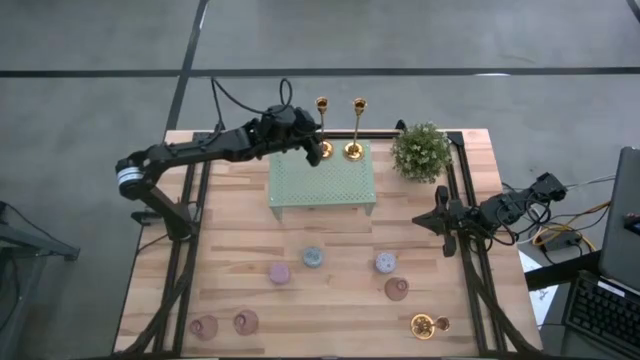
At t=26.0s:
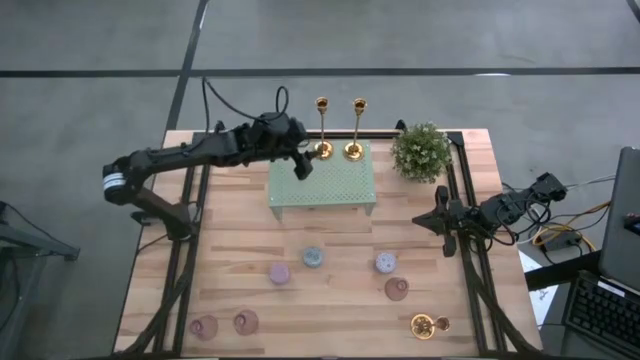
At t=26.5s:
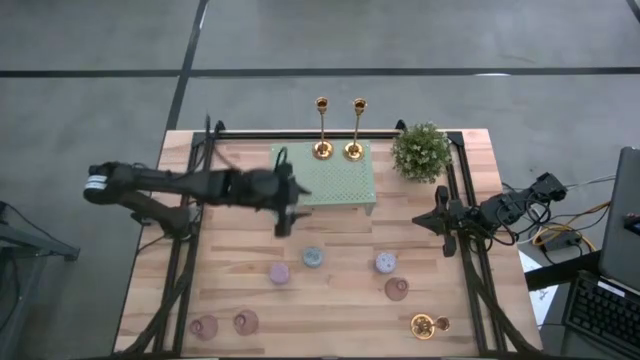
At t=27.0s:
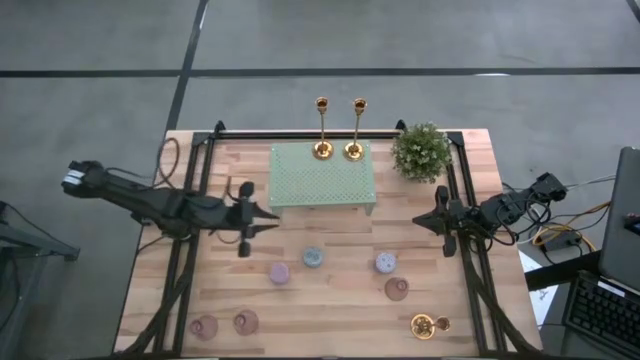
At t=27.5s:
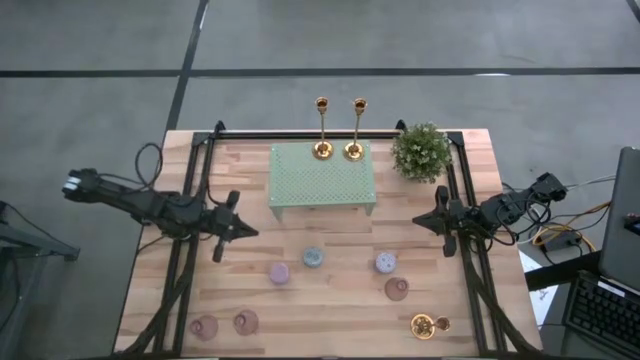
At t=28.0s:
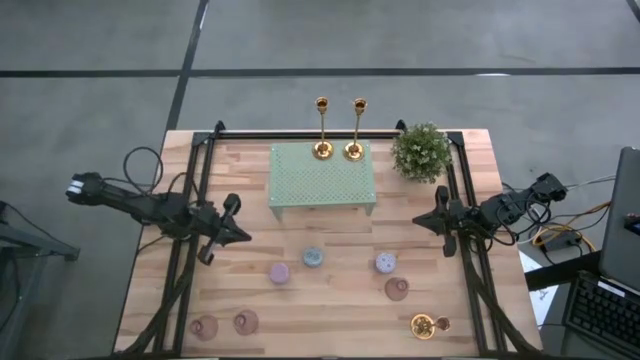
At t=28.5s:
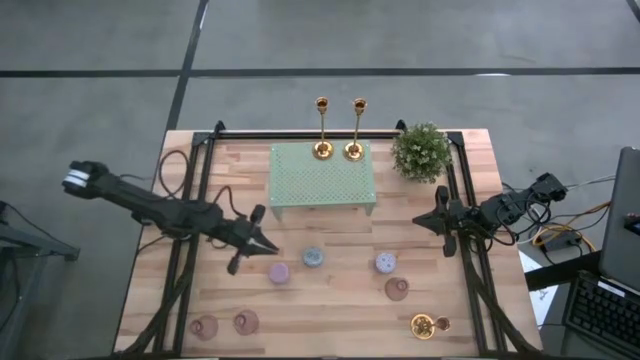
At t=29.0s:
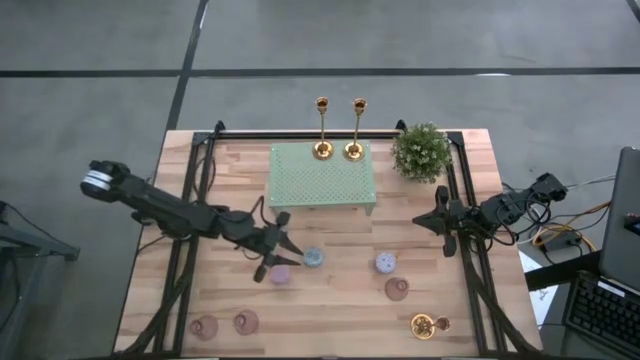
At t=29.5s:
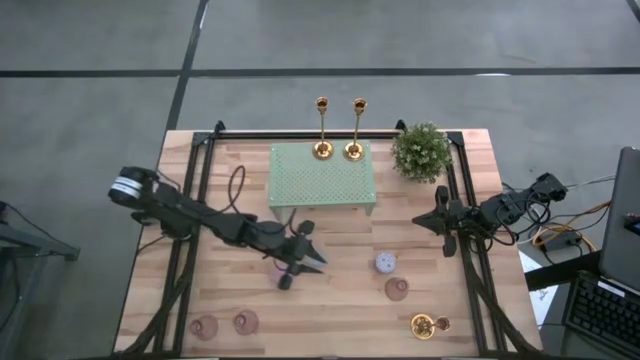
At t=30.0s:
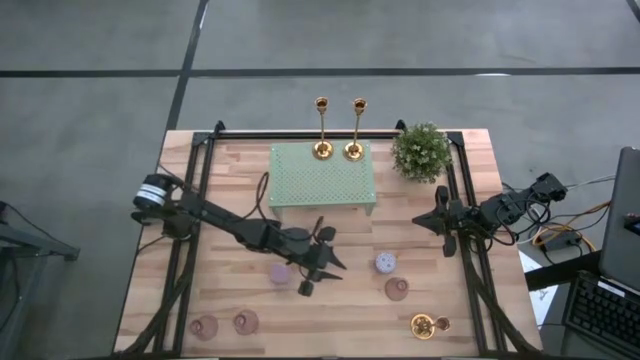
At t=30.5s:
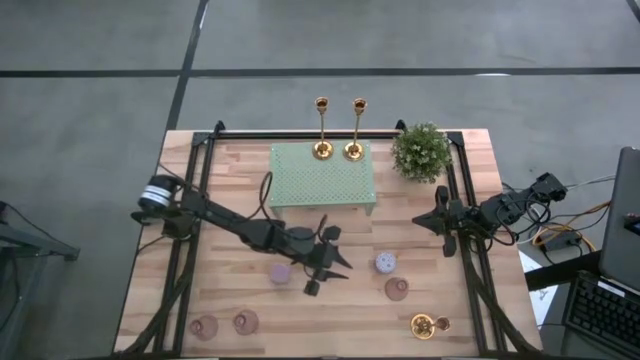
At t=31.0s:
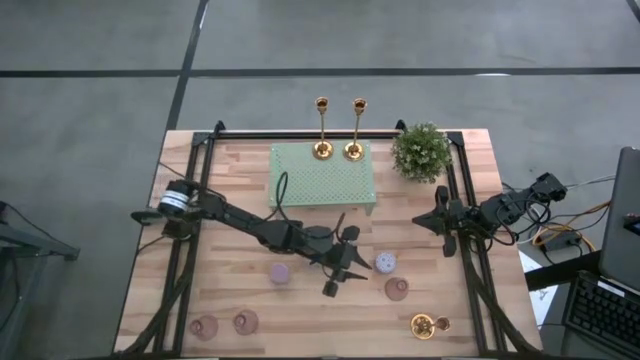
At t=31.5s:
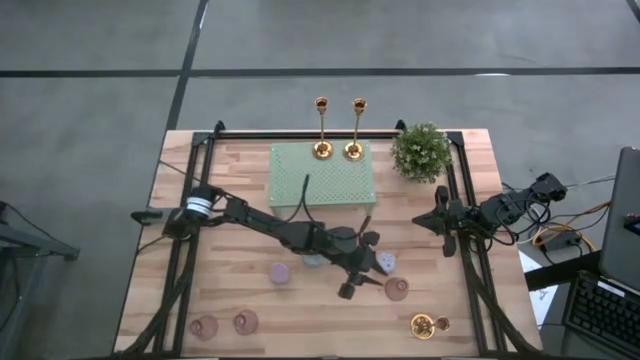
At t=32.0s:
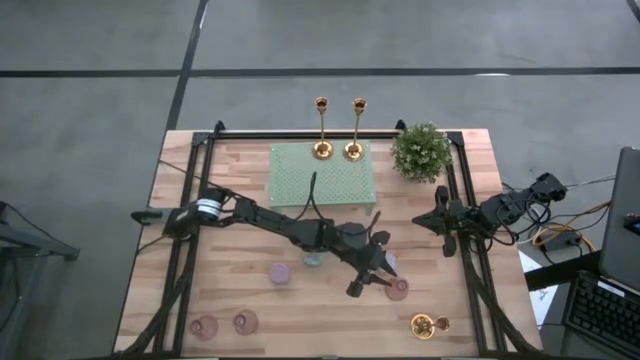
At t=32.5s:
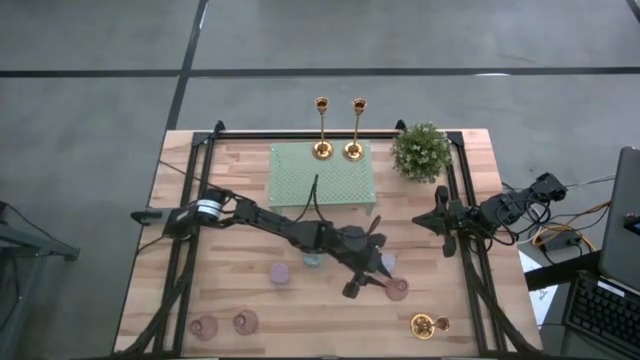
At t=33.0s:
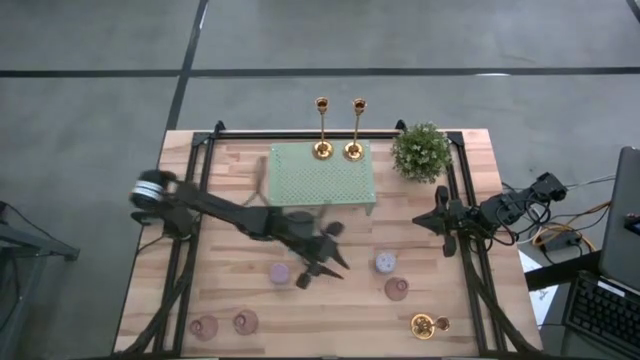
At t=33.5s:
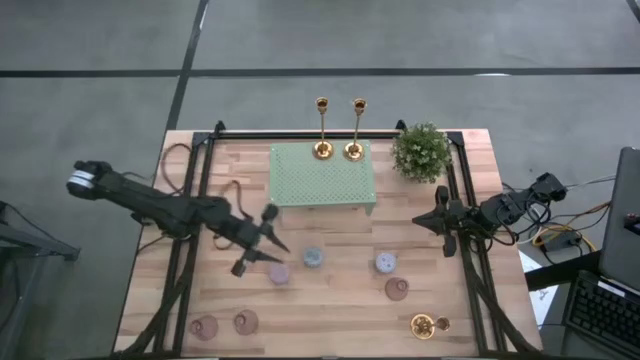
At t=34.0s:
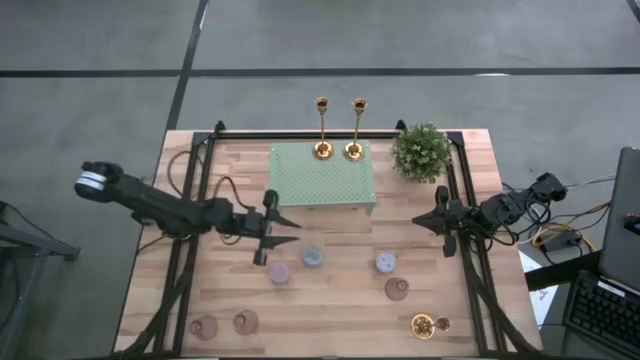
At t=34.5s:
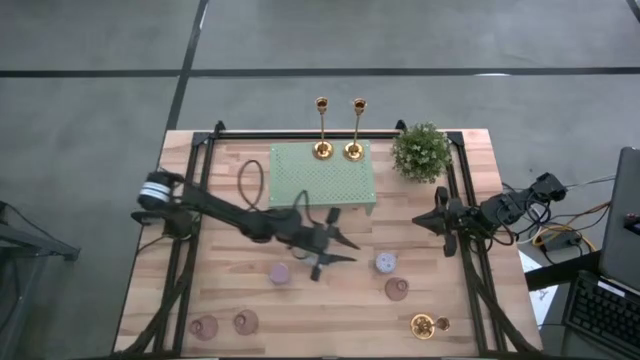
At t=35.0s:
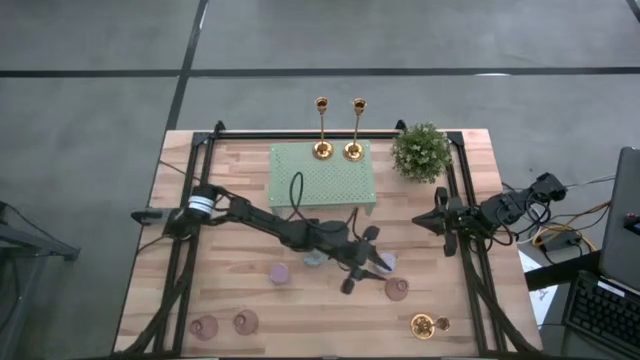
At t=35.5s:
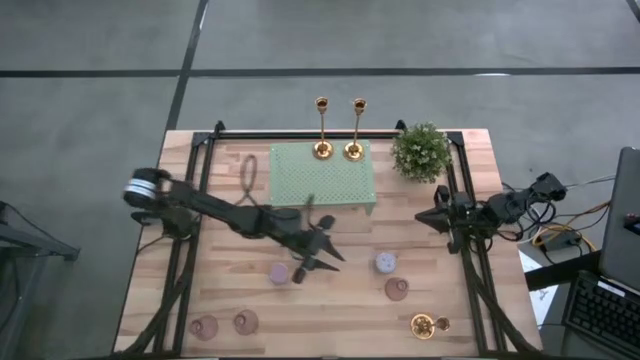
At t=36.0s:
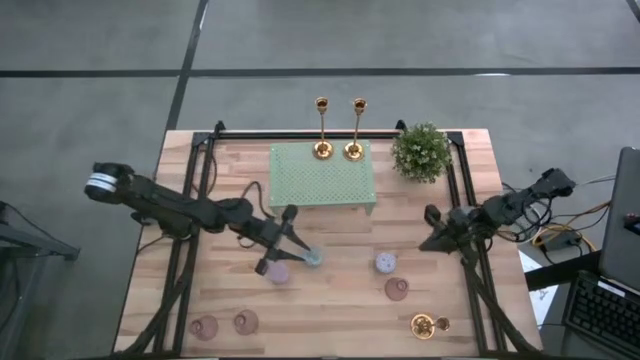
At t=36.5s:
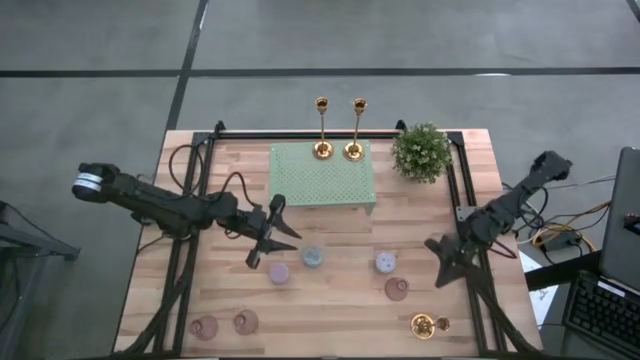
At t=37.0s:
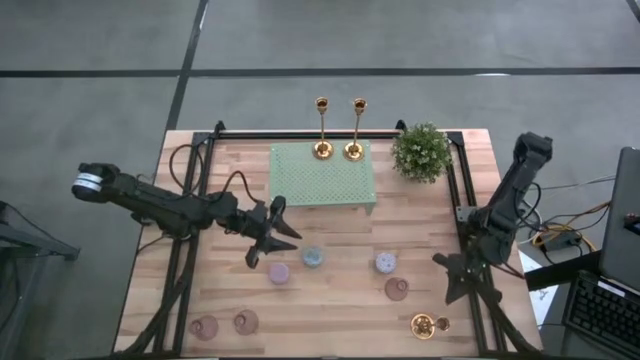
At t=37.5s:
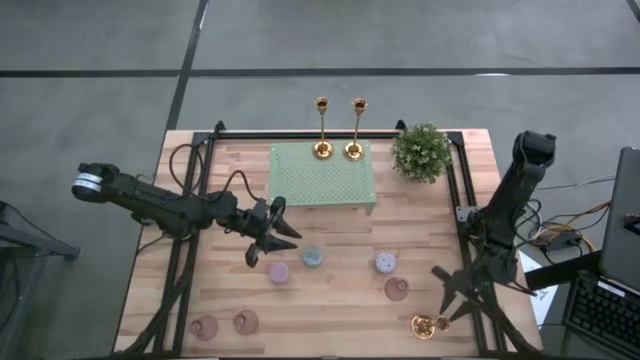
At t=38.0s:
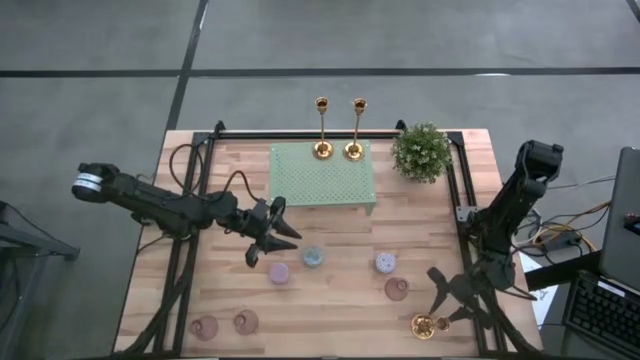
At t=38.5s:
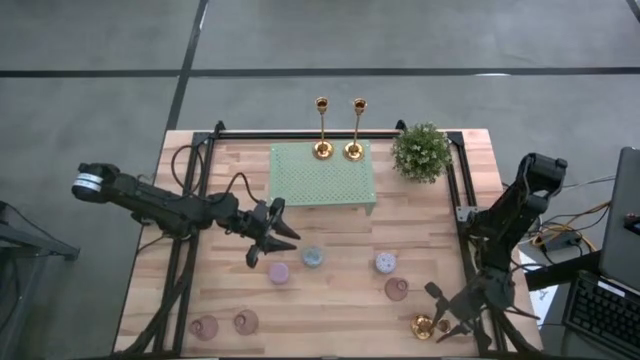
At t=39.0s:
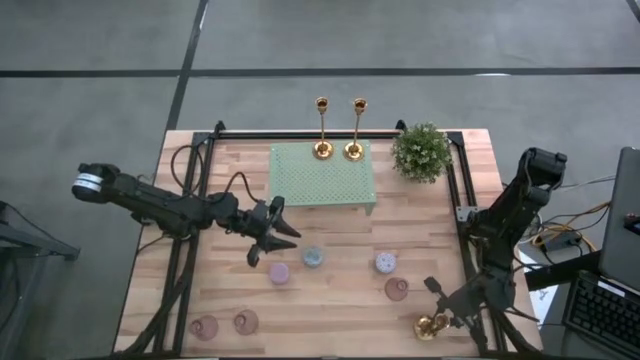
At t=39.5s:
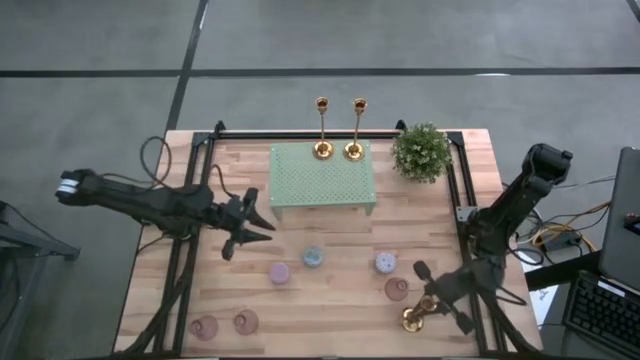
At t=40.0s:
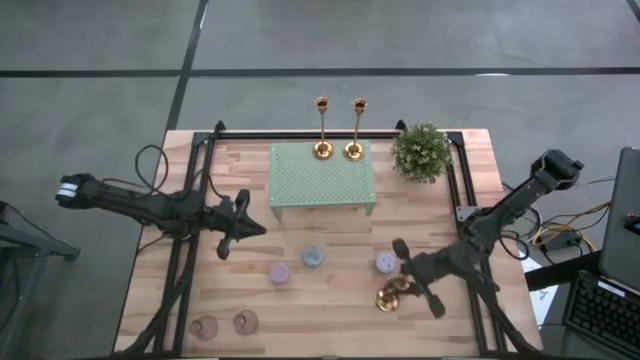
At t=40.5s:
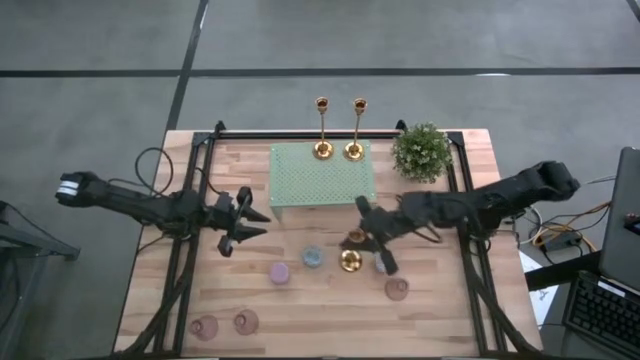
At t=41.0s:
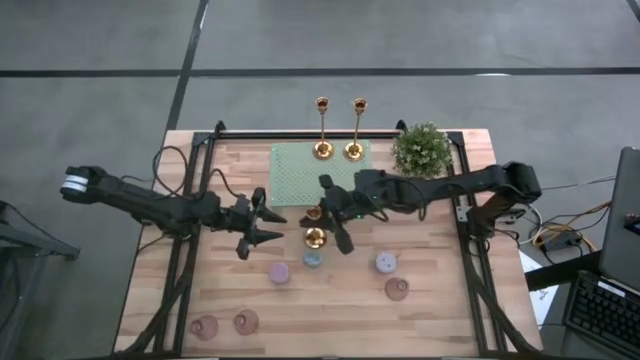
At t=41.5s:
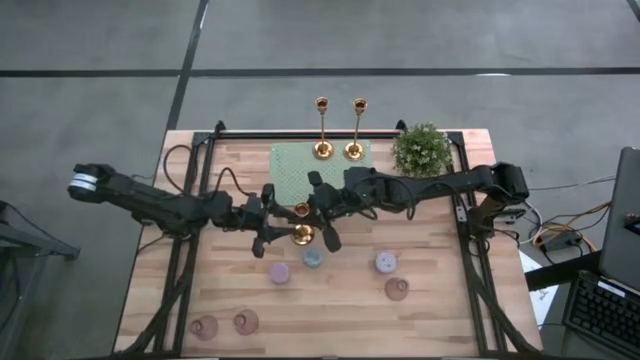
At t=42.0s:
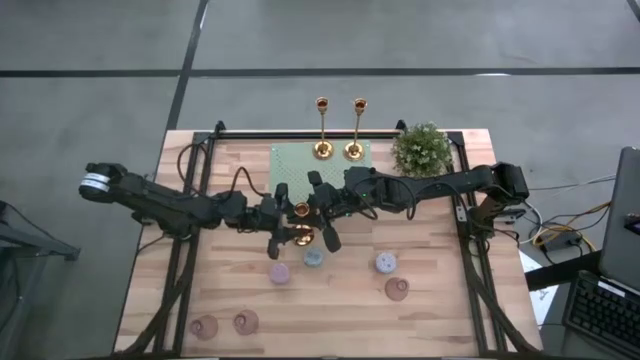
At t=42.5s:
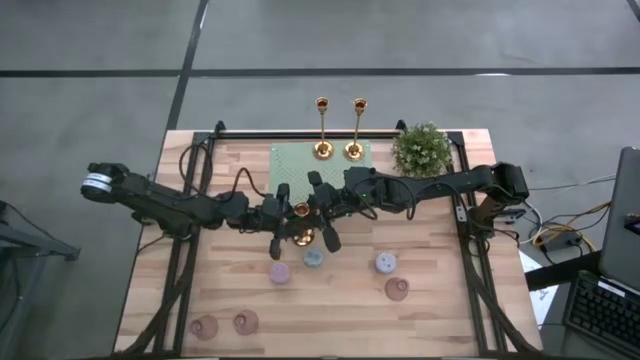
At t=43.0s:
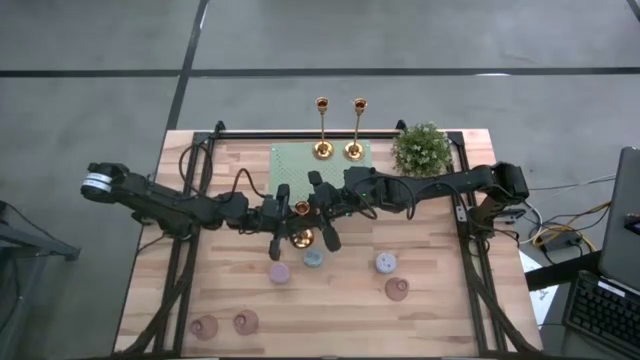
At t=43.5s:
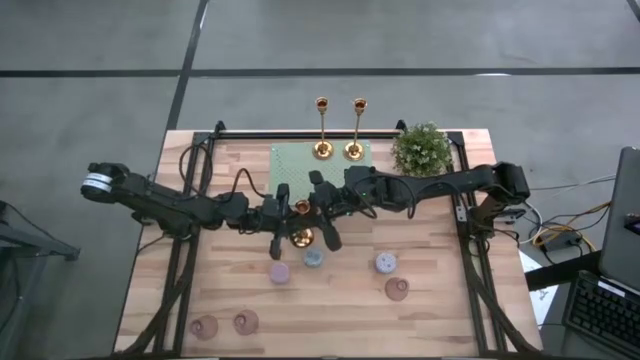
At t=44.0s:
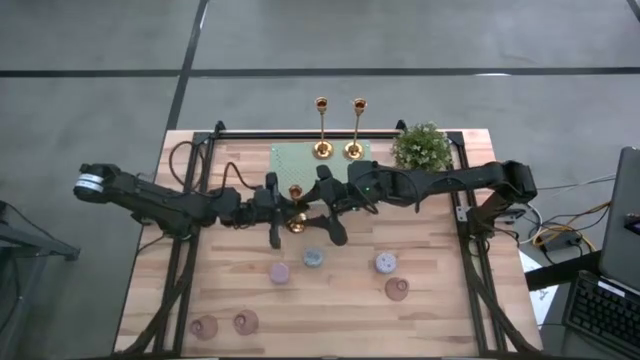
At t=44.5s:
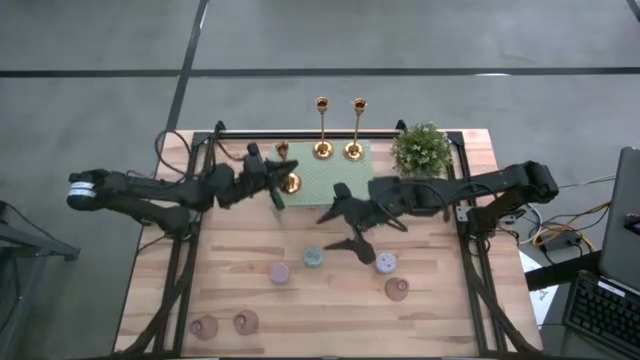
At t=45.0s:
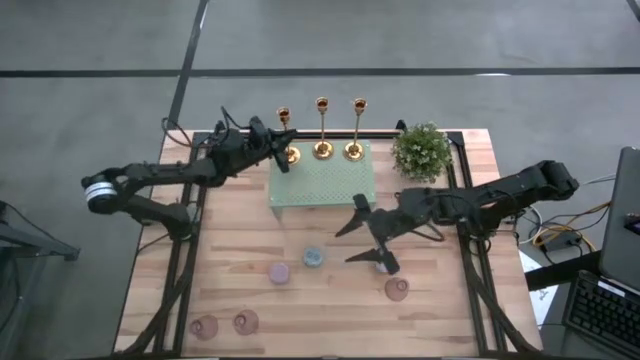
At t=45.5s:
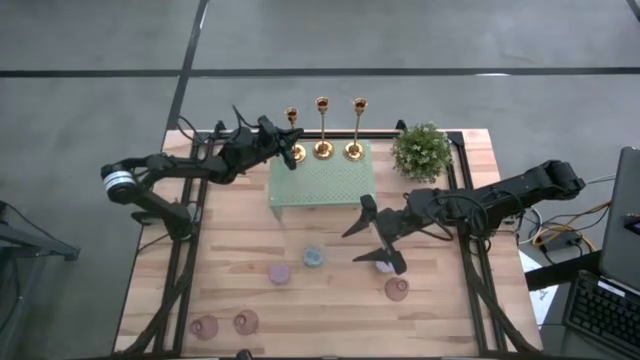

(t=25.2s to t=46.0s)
Task: Pick & Place candle stick holders
Put the gold candle holder on the shelf
